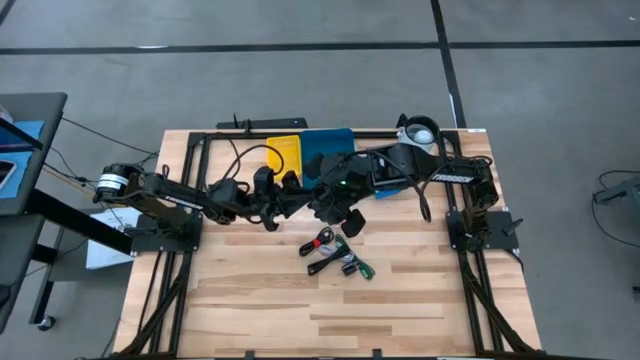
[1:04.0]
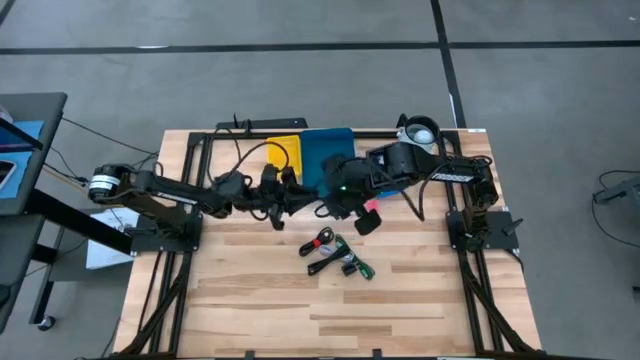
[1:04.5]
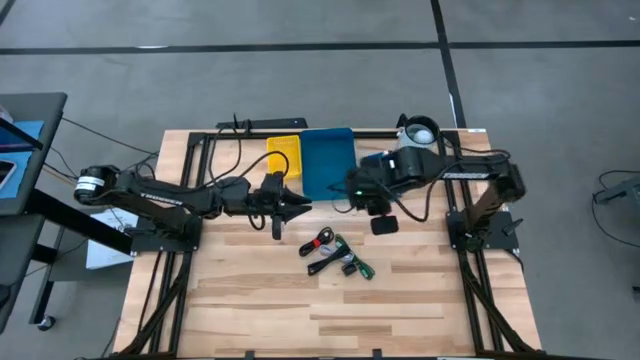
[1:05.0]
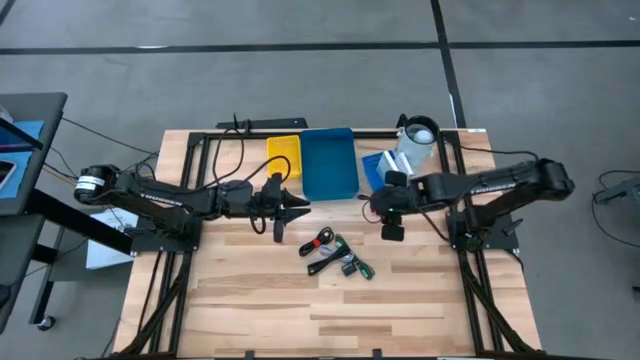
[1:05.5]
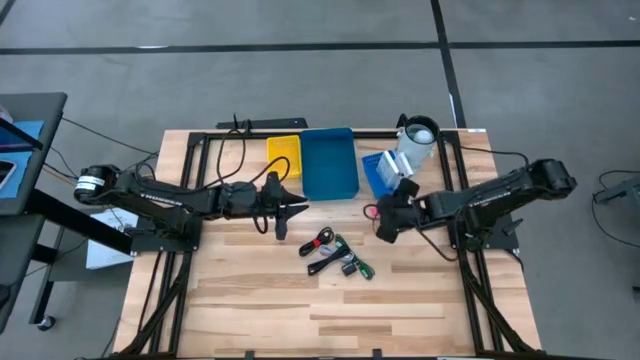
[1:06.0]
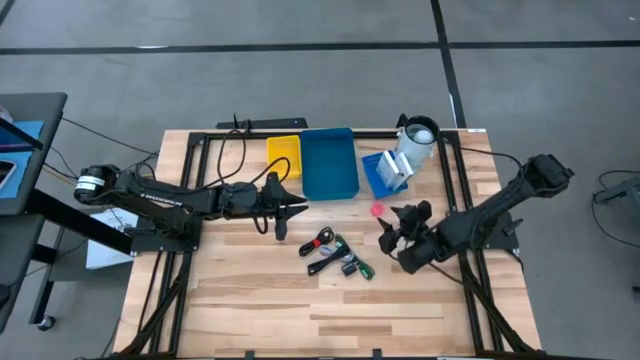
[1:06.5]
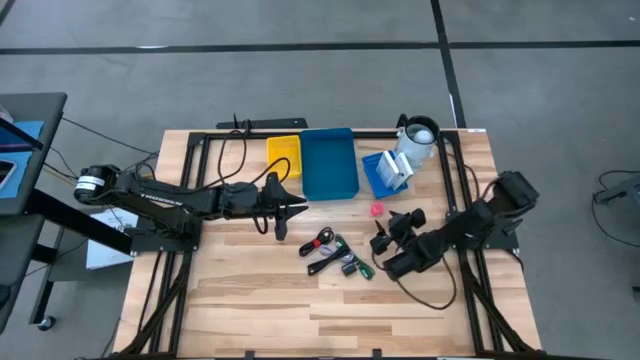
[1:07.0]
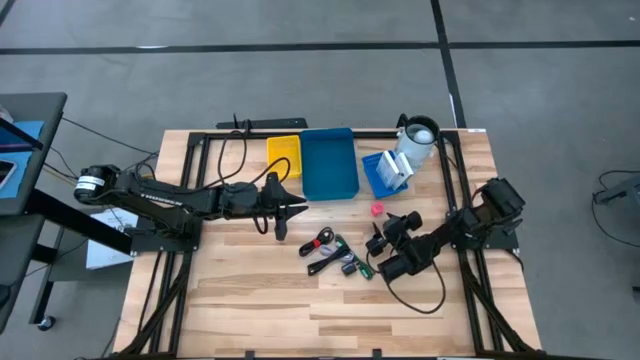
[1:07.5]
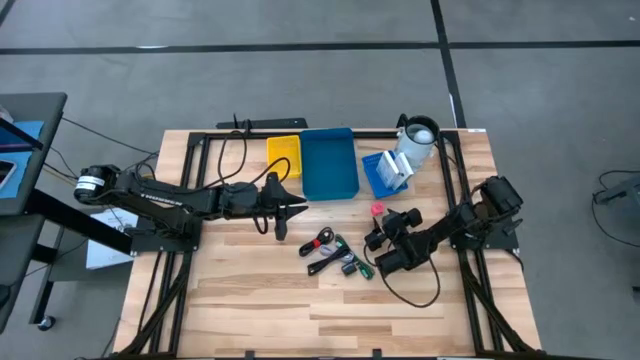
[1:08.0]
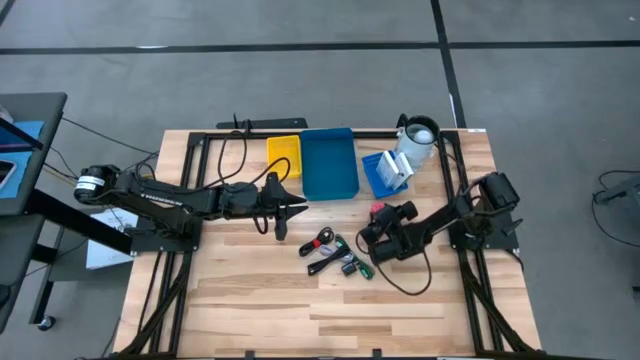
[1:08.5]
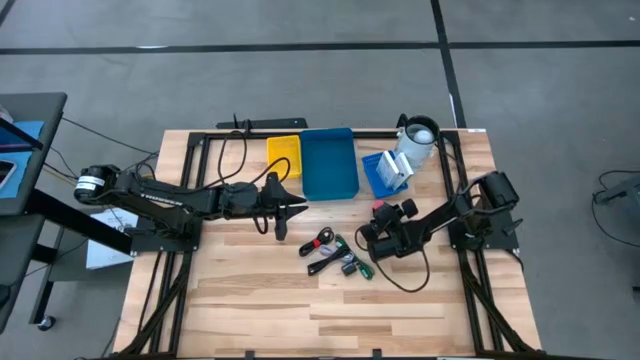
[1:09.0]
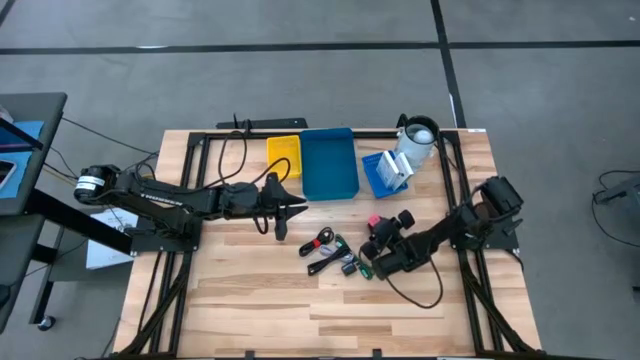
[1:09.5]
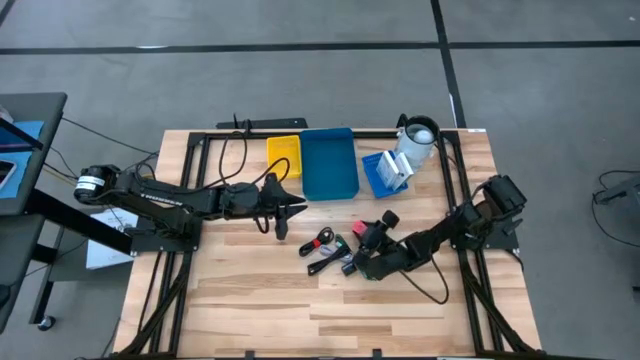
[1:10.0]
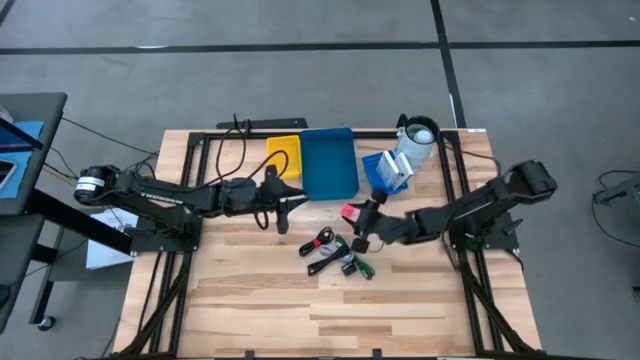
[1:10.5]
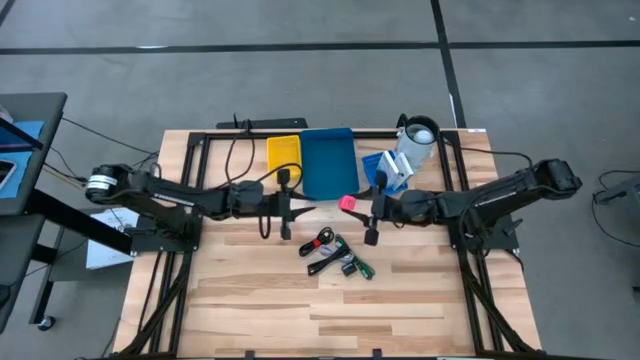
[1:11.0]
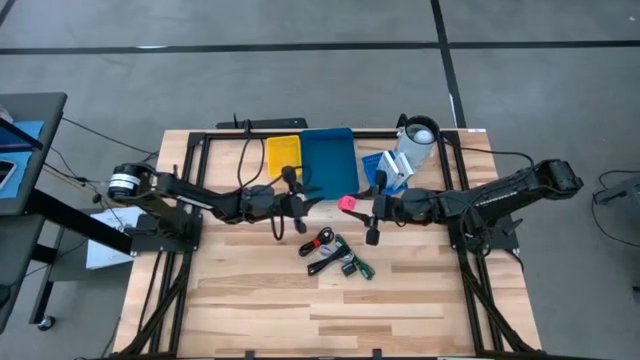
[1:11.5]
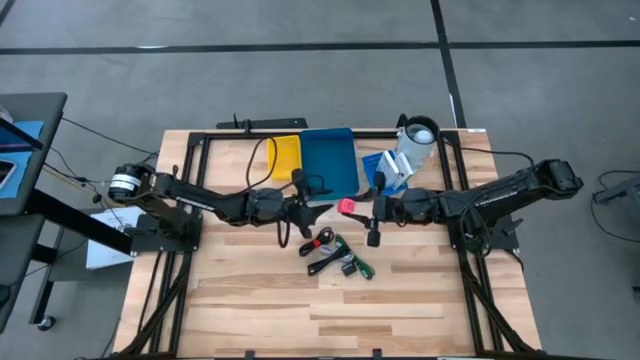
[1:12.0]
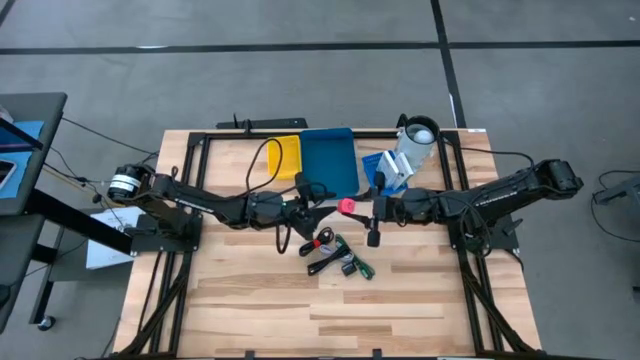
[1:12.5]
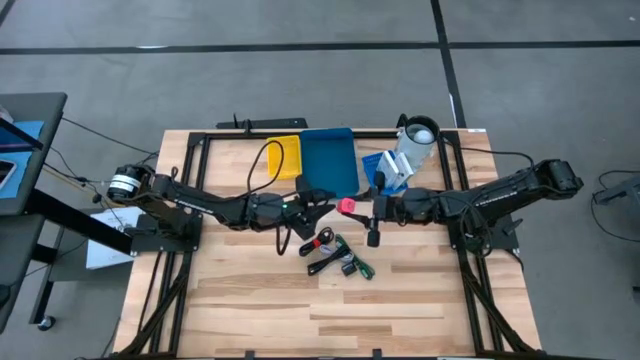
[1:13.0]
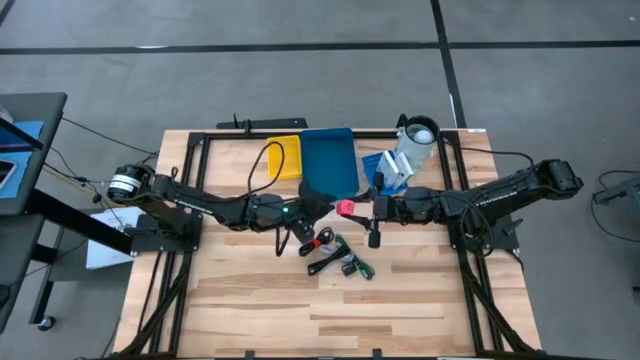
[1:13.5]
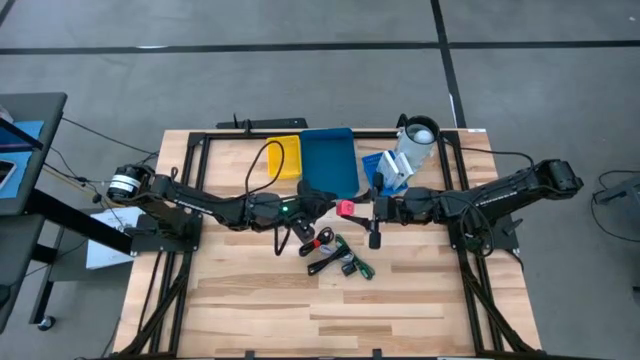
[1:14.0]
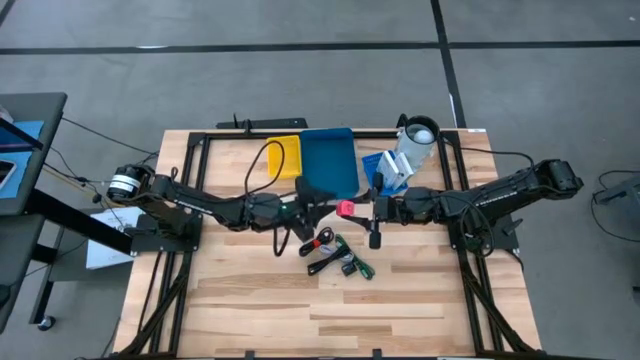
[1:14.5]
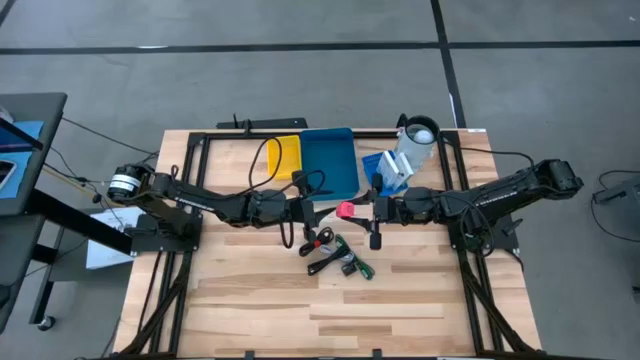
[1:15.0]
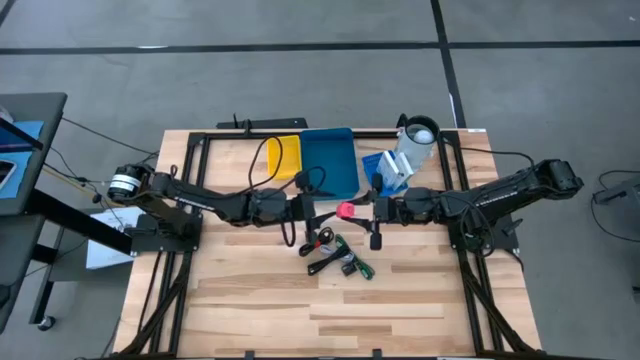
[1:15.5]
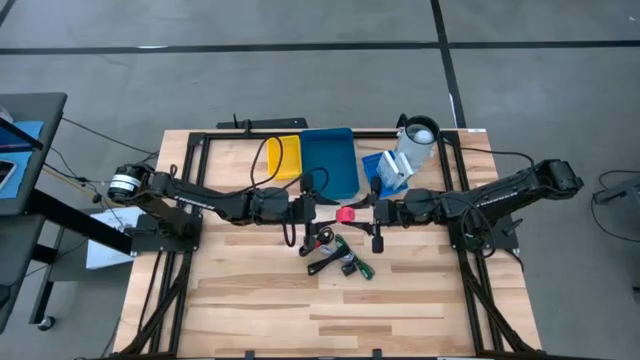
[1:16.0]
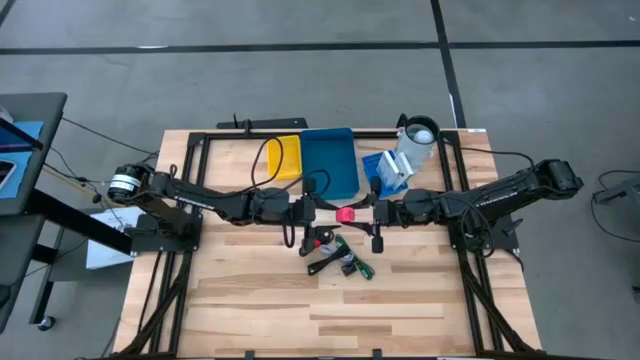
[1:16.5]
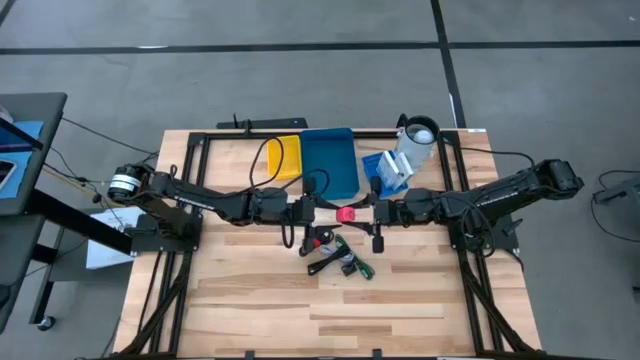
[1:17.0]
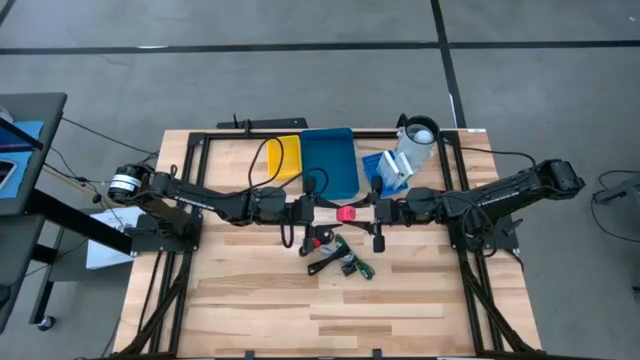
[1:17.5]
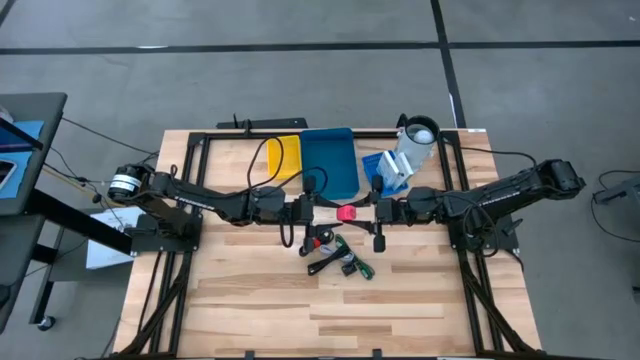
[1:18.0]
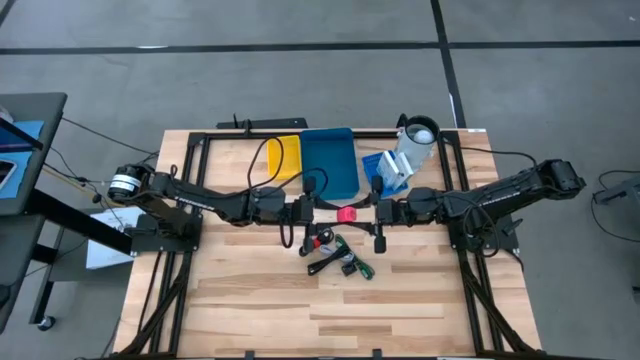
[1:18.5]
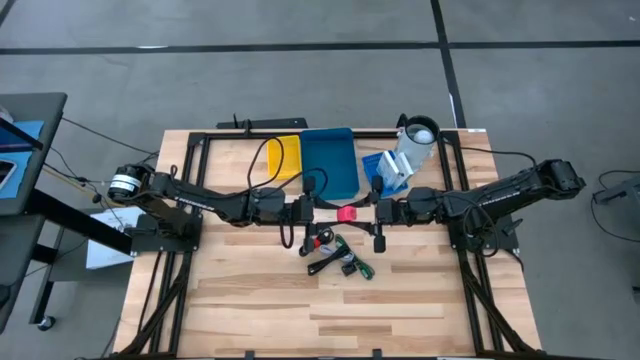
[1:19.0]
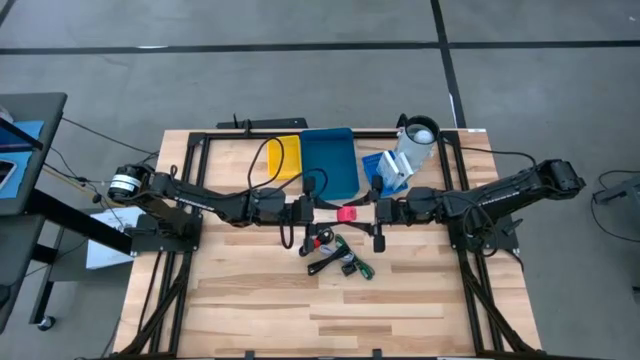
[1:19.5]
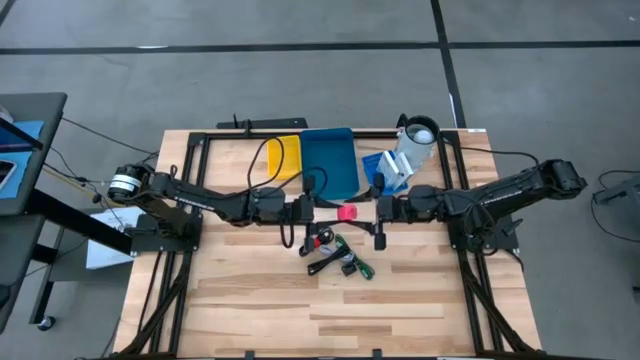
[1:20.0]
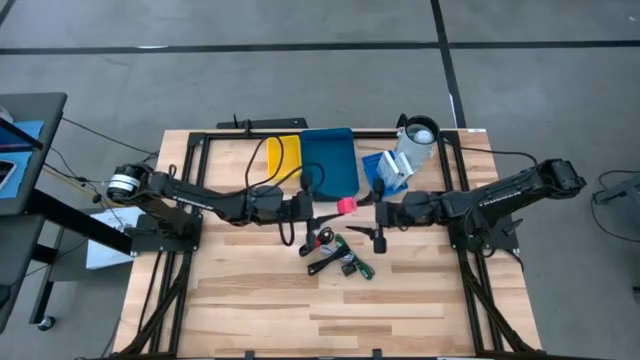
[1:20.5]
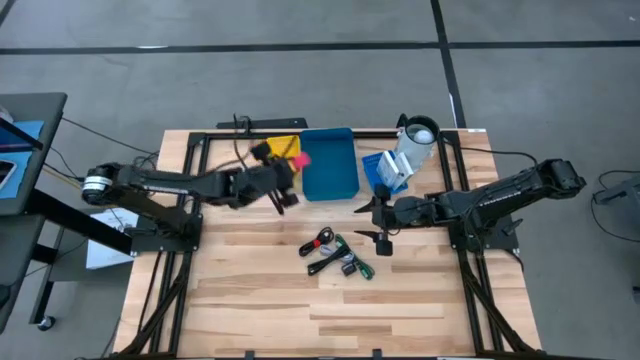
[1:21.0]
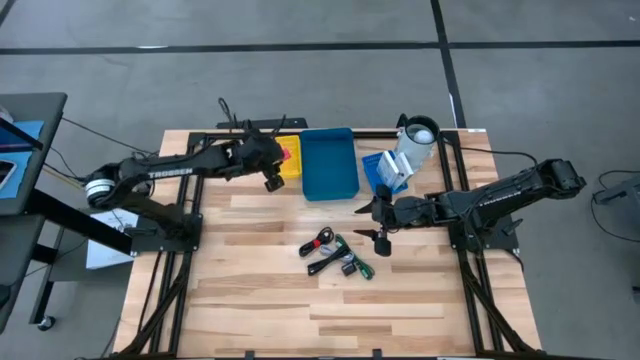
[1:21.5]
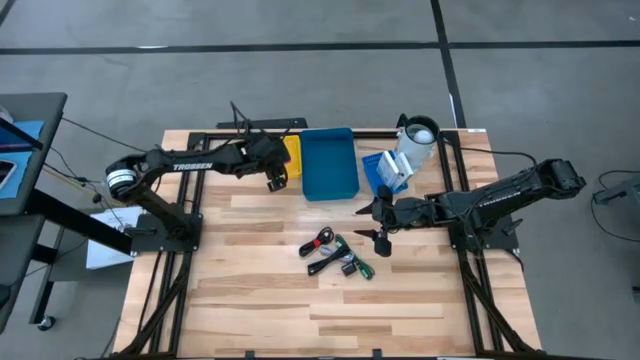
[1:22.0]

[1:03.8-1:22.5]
Task: Pick and place items into bin
Put the pink charger adapter into the yellow basket

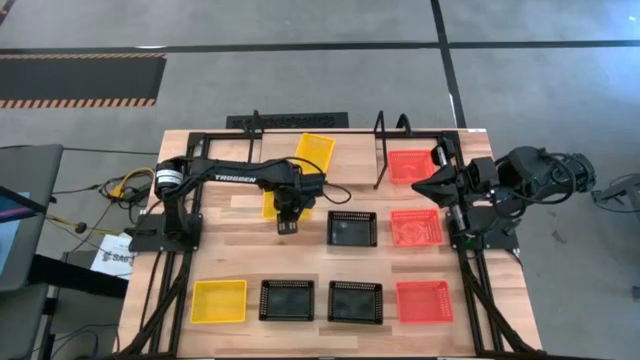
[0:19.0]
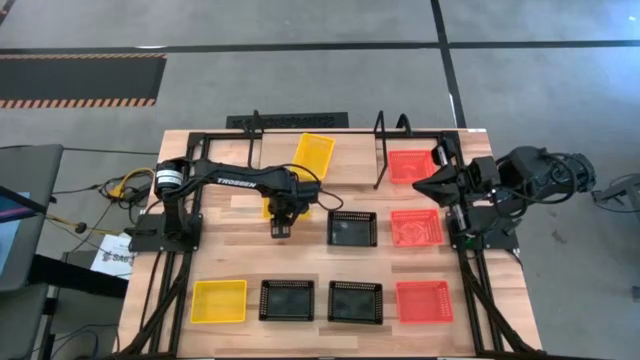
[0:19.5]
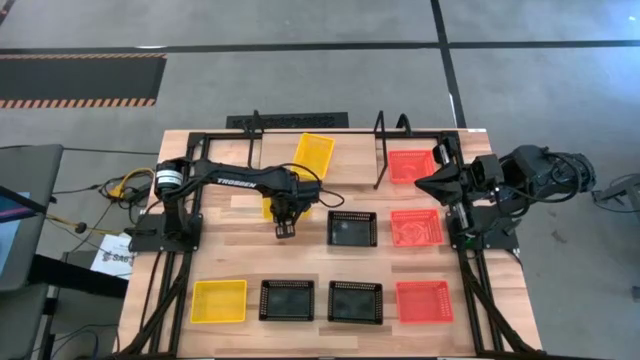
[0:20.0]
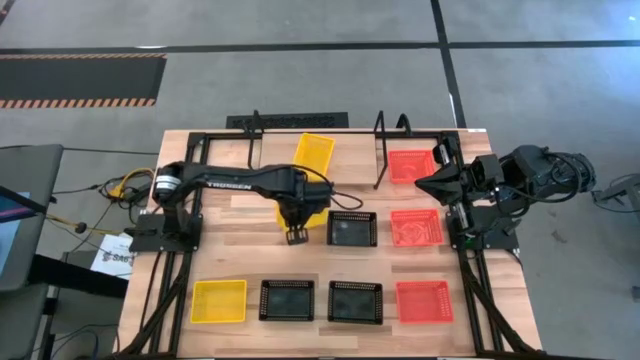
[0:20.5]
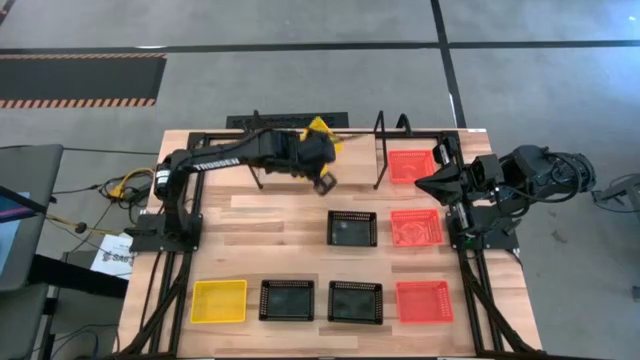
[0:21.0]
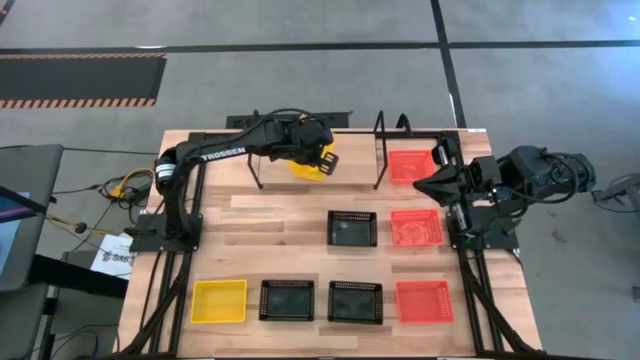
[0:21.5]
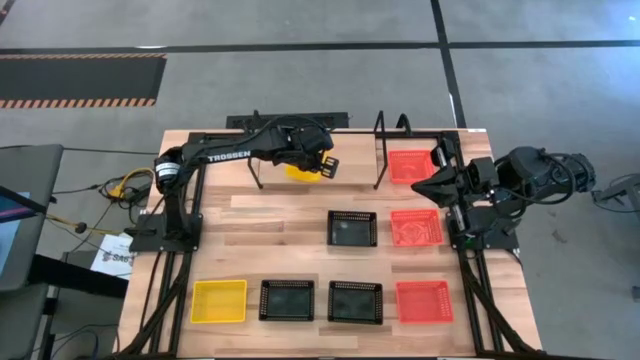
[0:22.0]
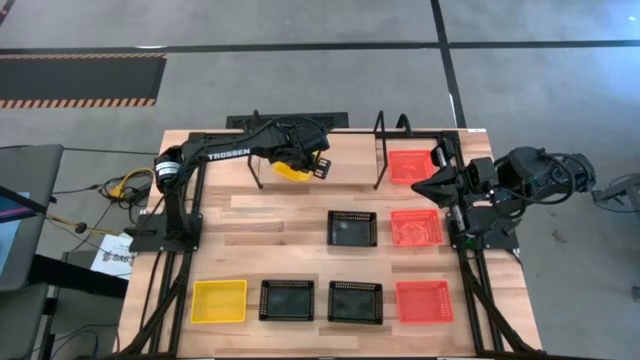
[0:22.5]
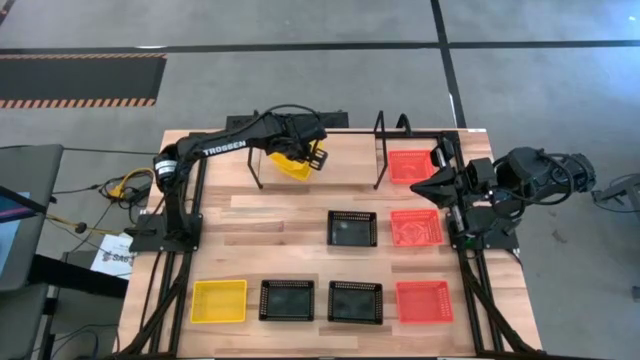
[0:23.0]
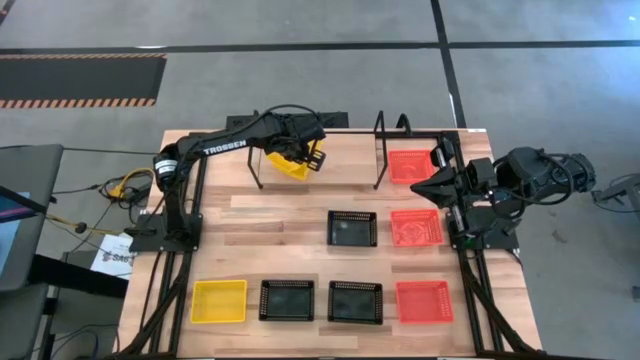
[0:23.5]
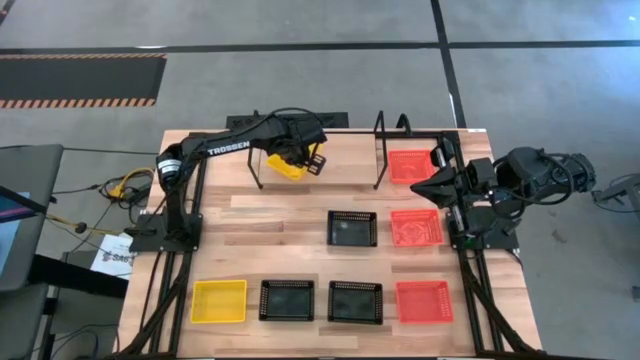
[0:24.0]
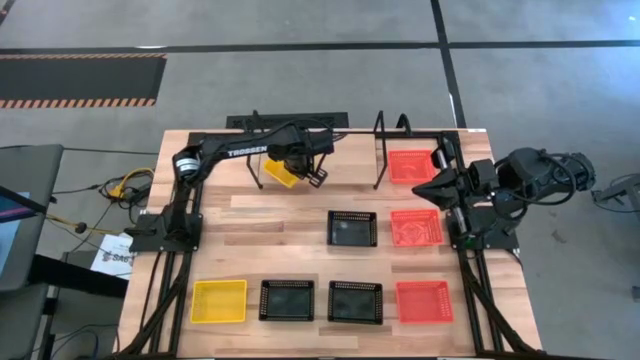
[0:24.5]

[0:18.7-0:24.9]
Task: Stack baskets on shelf by color
Stack the top yellow bin on top of the other yellow bin on the shelf
